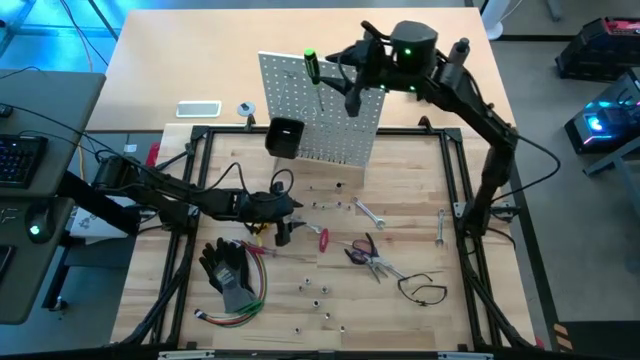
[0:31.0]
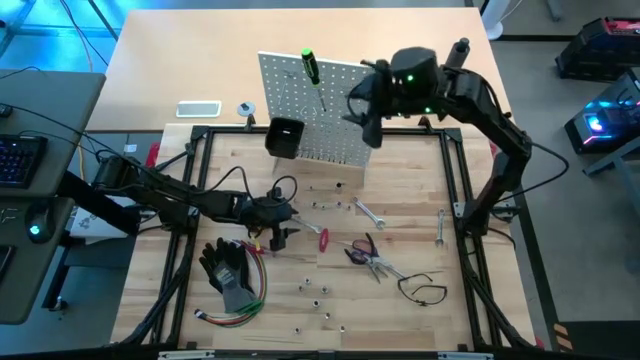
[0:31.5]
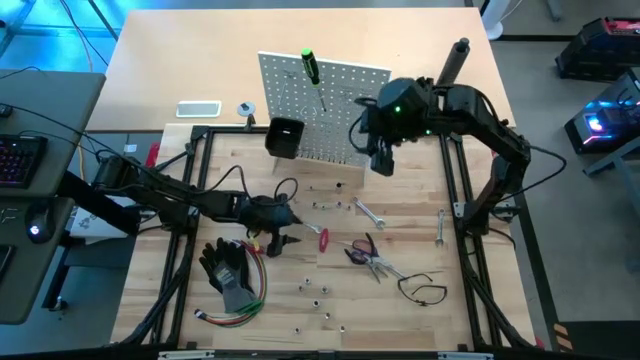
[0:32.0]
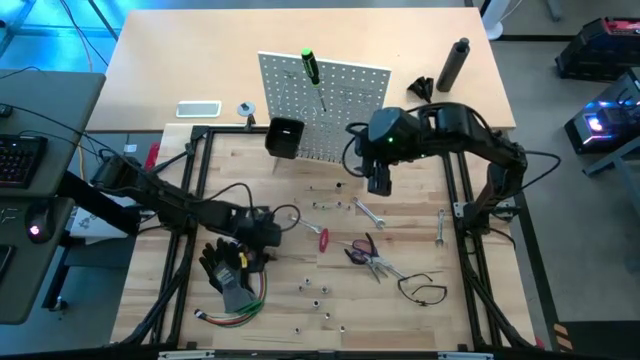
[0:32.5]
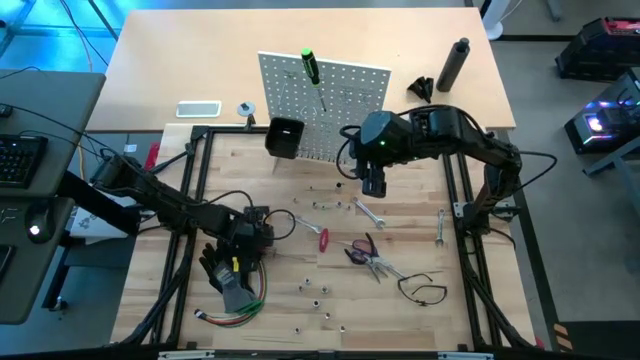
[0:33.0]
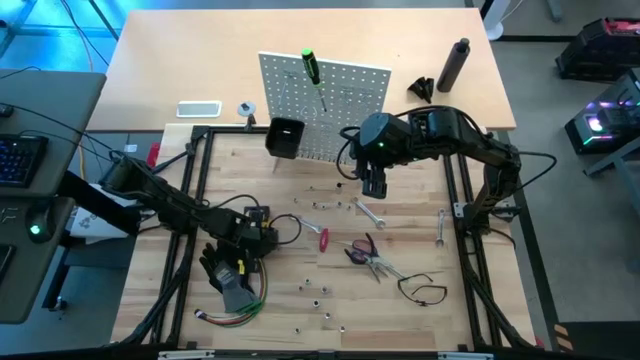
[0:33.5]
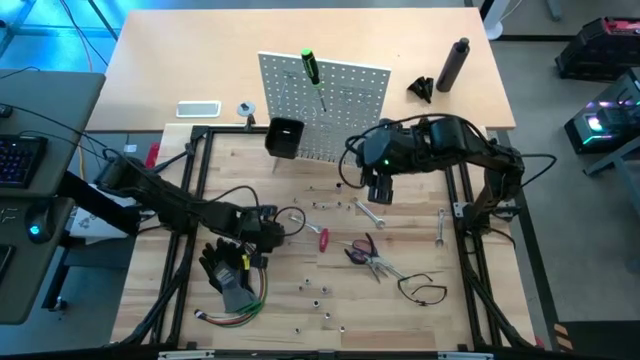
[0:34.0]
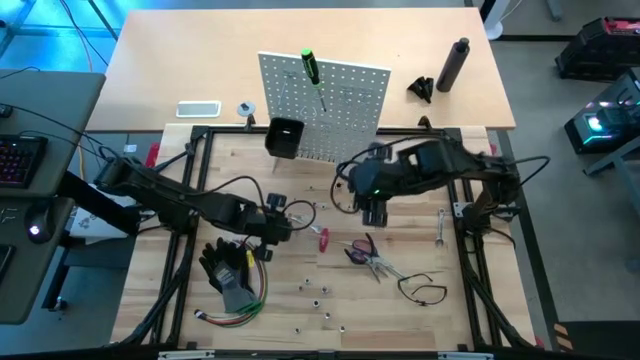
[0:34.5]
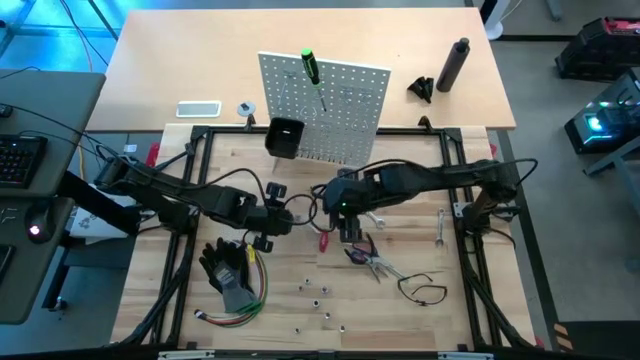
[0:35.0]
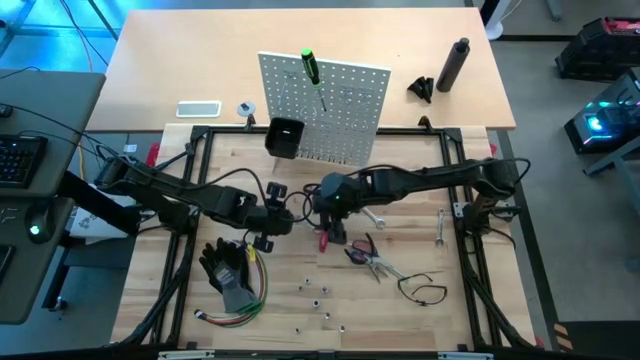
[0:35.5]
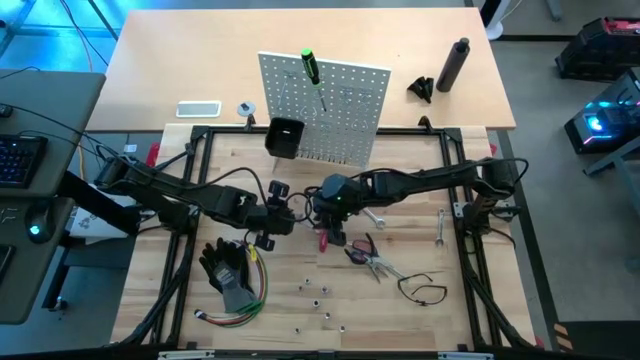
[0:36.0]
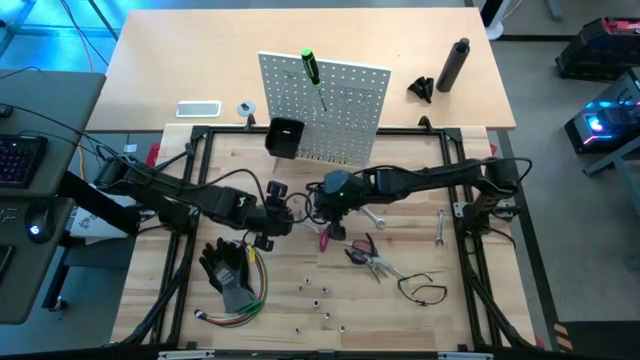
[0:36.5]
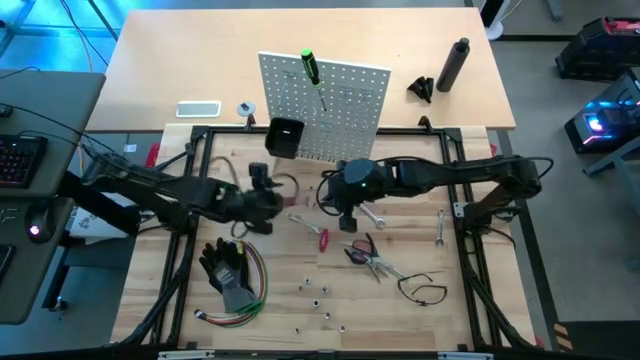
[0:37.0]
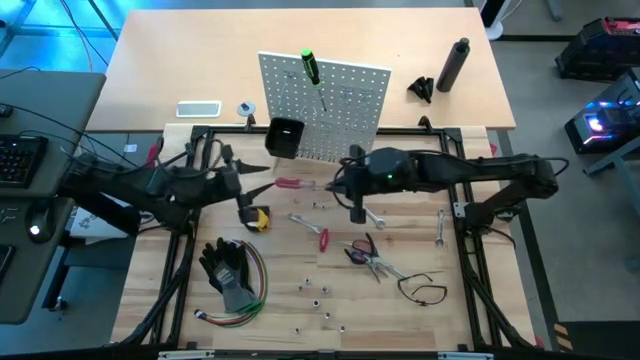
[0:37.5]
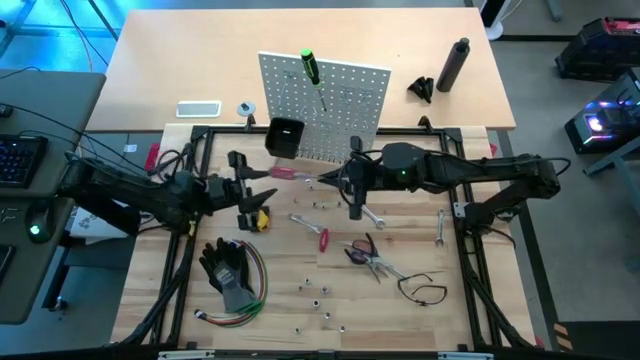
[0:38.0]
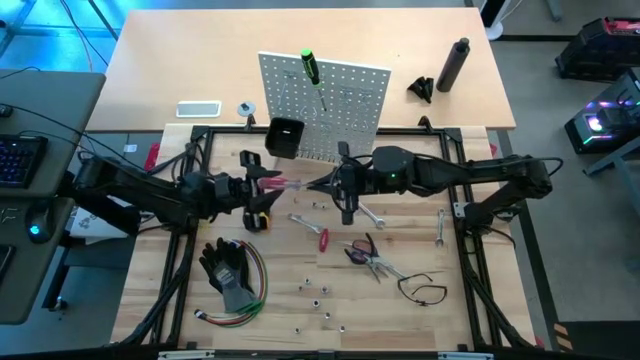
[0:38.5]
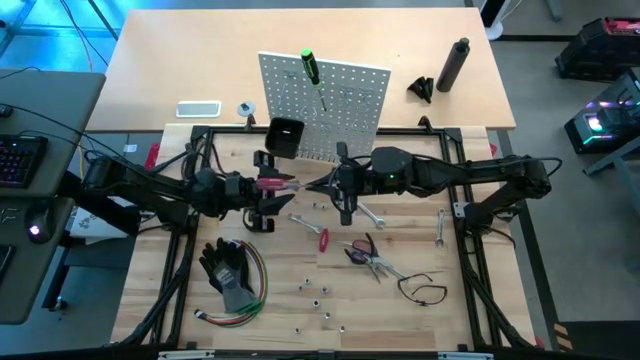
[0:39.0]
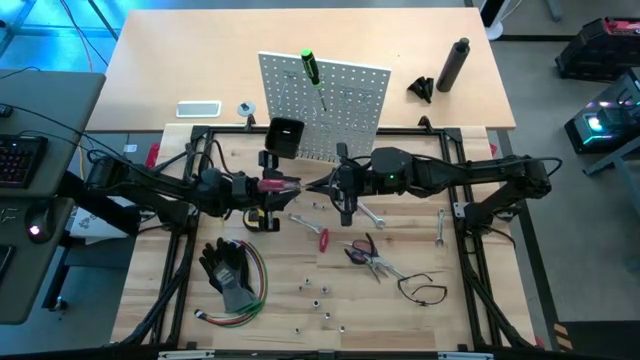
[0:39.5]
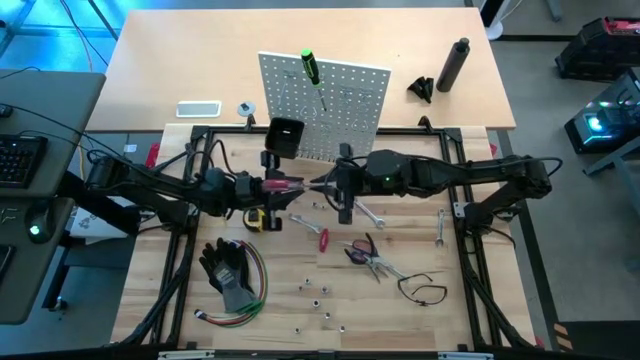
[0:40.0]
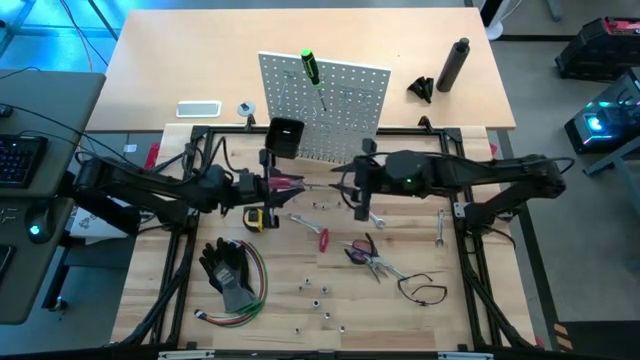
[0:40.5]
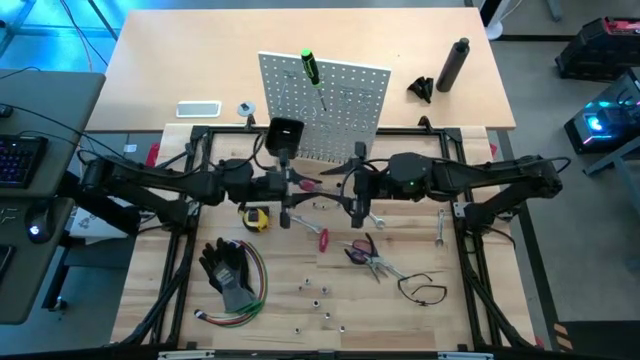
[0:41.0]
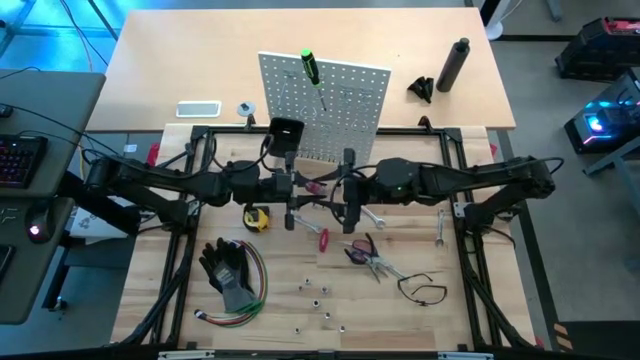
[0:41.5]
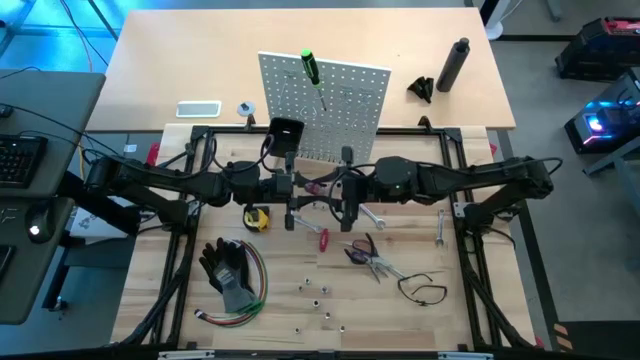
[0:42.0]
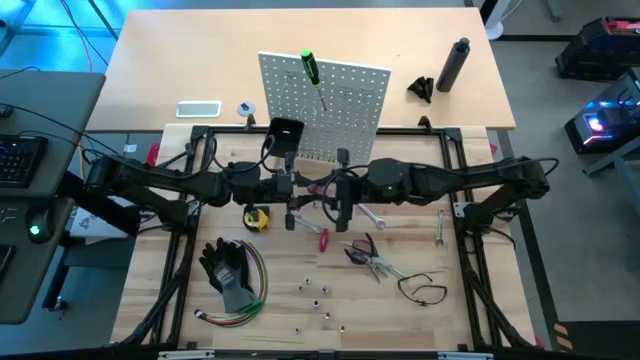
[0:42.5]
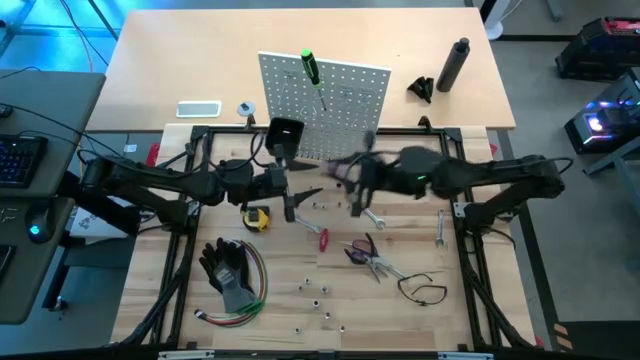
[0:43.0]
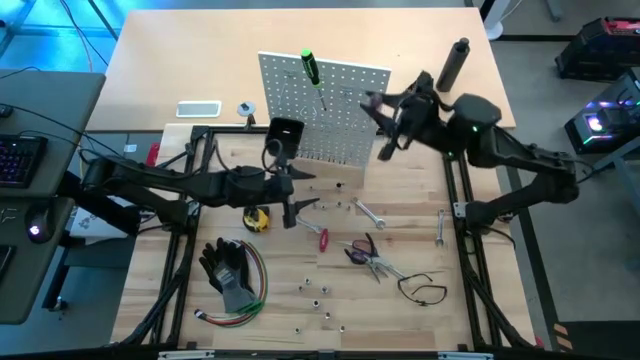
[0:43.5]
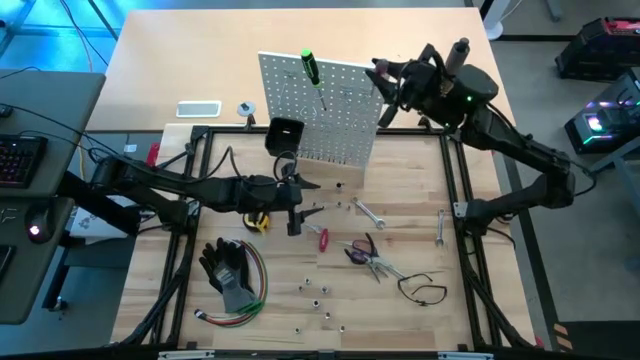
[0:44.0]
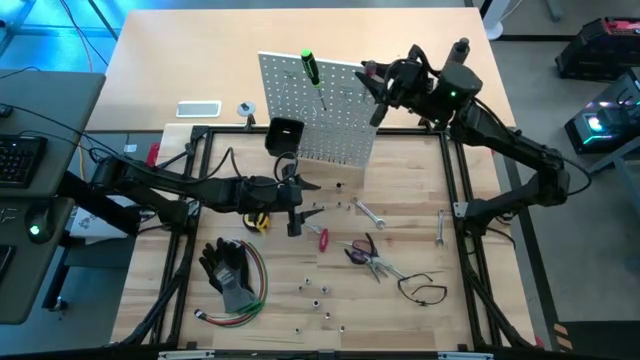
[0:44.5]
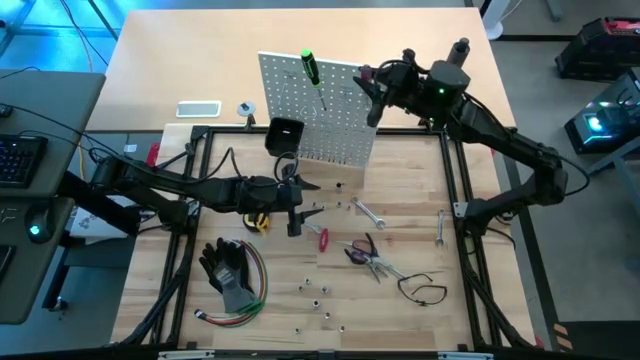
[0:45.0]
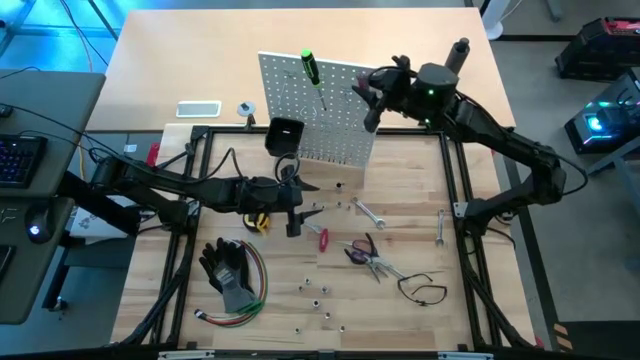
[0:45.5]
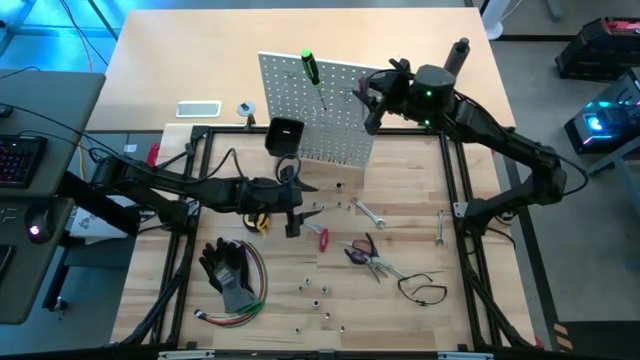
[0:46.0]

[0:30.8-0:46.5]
Task: Hang tools onto peg board
Hang the red screwdriver on the white peg board
